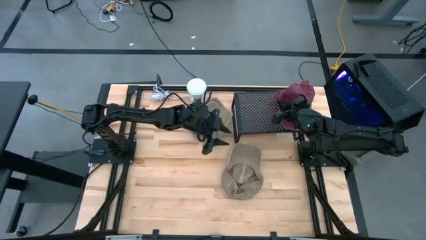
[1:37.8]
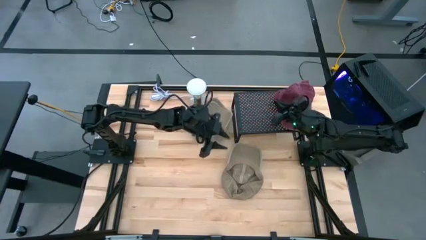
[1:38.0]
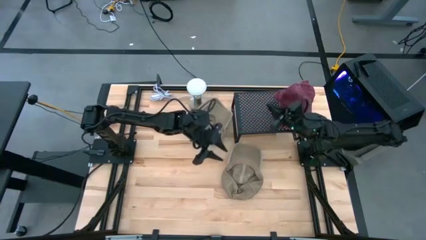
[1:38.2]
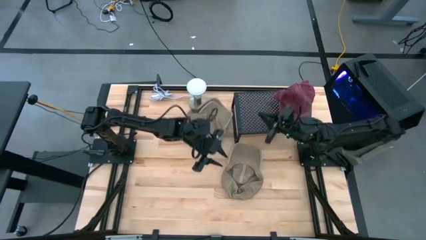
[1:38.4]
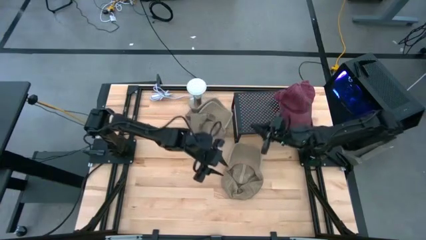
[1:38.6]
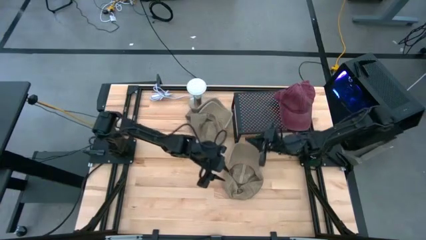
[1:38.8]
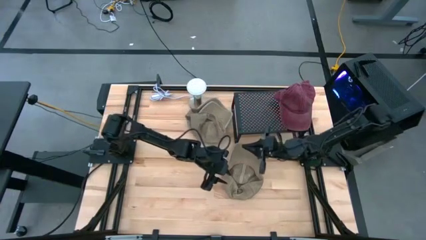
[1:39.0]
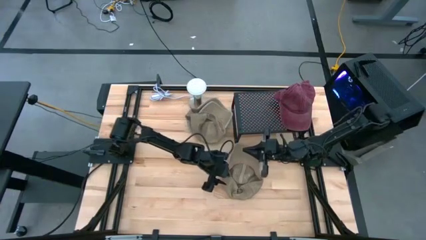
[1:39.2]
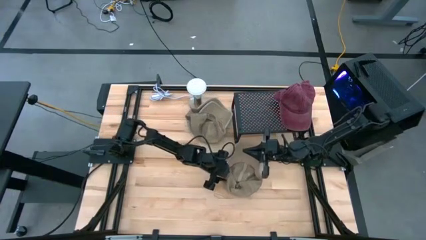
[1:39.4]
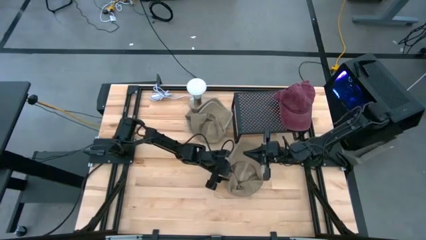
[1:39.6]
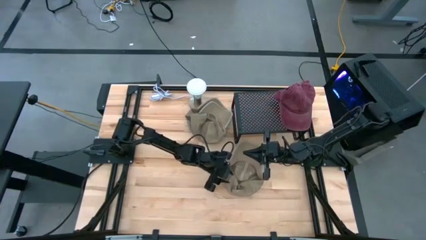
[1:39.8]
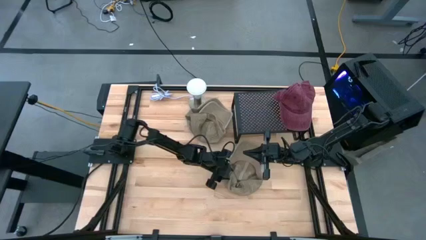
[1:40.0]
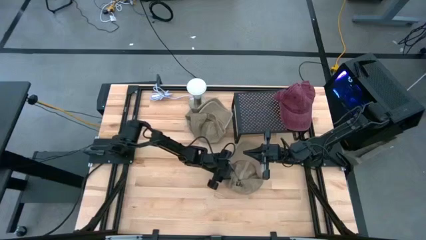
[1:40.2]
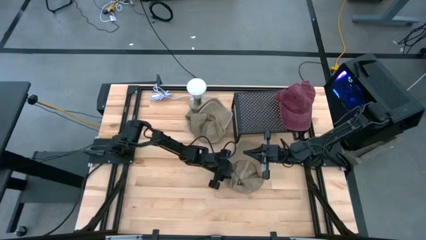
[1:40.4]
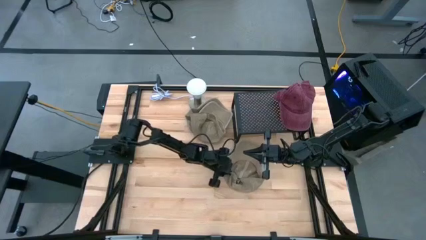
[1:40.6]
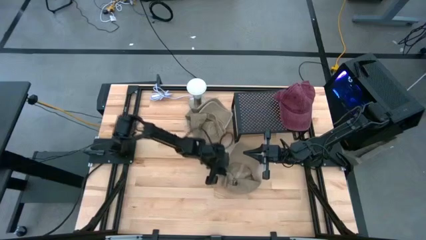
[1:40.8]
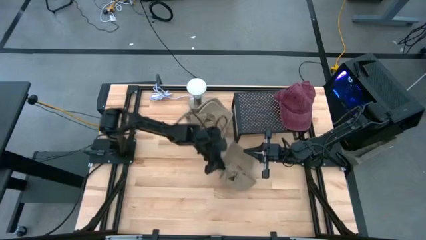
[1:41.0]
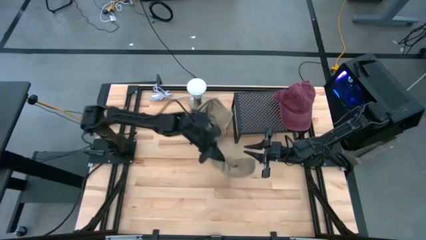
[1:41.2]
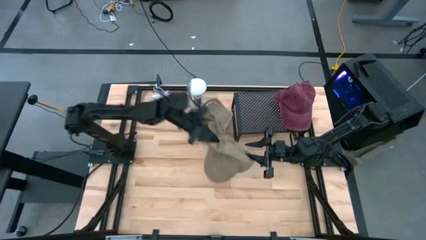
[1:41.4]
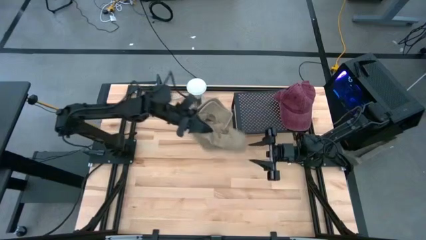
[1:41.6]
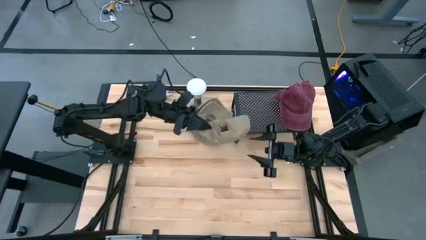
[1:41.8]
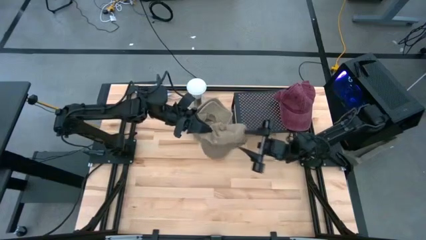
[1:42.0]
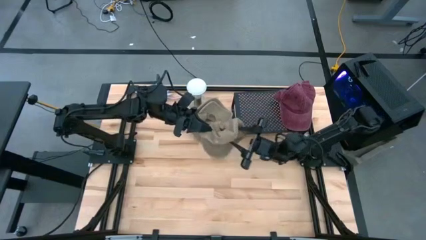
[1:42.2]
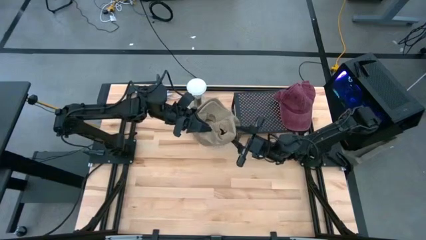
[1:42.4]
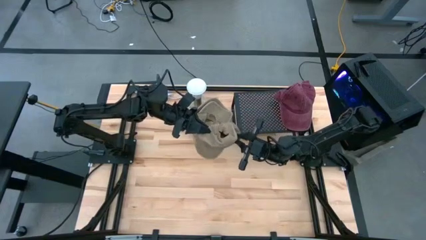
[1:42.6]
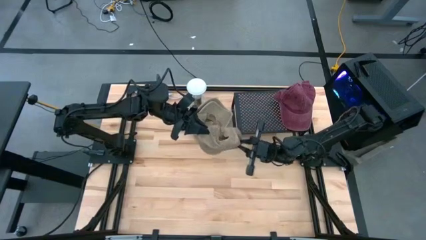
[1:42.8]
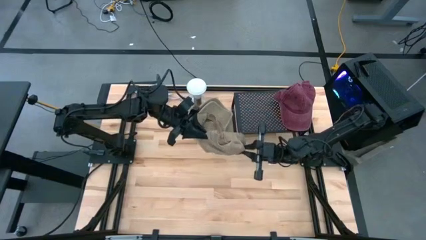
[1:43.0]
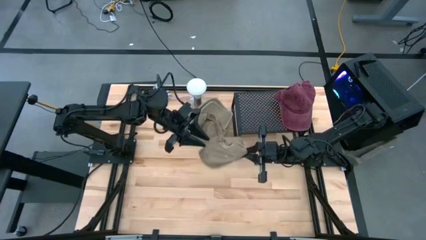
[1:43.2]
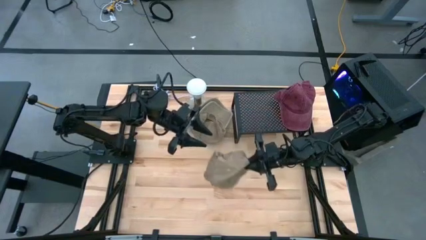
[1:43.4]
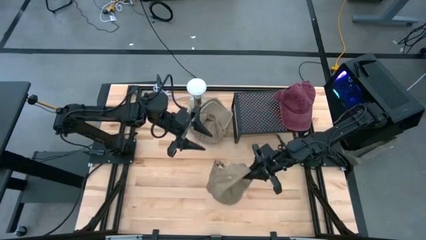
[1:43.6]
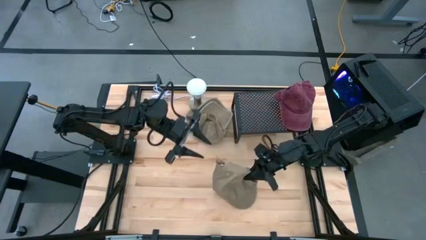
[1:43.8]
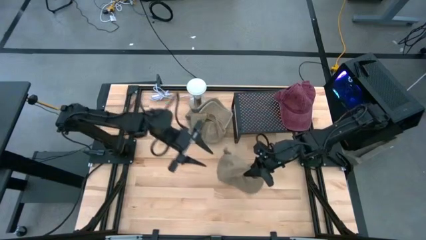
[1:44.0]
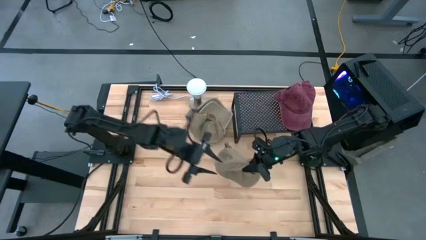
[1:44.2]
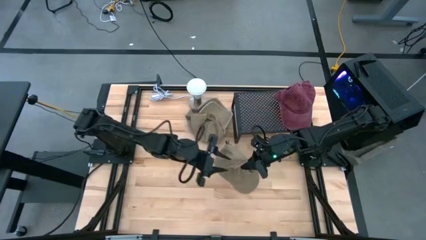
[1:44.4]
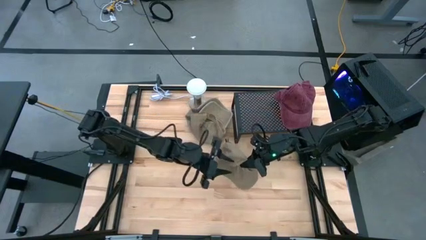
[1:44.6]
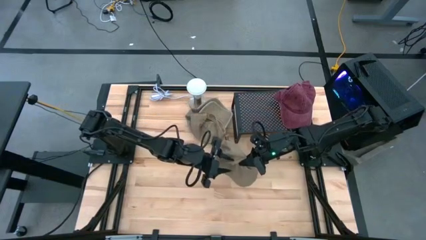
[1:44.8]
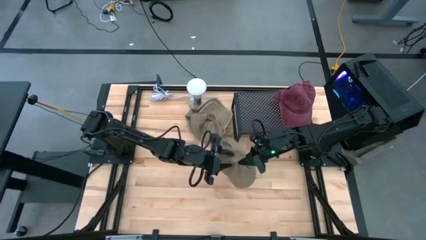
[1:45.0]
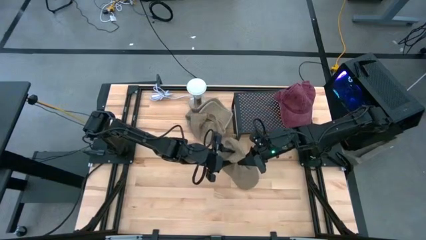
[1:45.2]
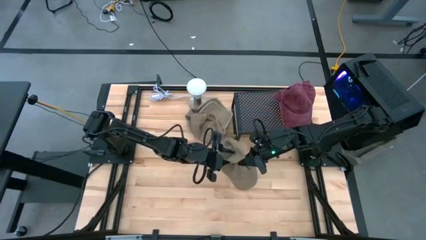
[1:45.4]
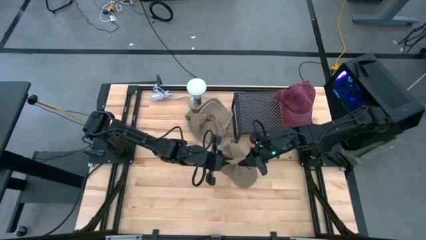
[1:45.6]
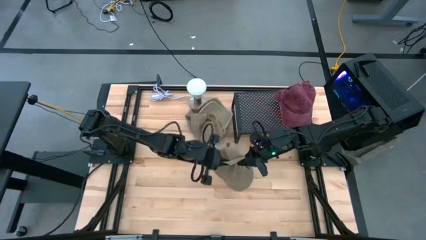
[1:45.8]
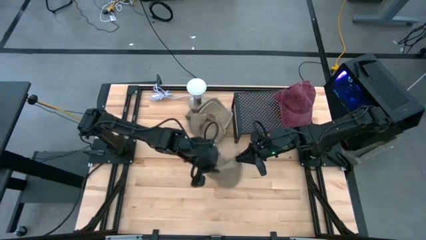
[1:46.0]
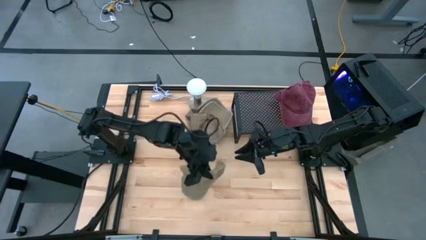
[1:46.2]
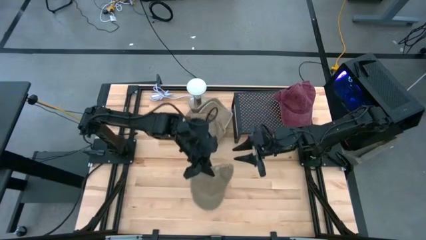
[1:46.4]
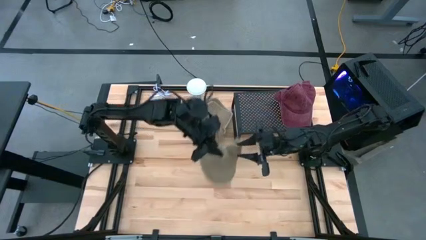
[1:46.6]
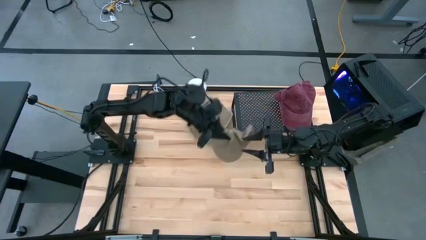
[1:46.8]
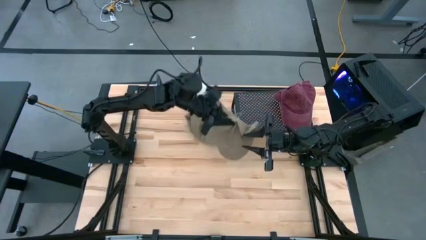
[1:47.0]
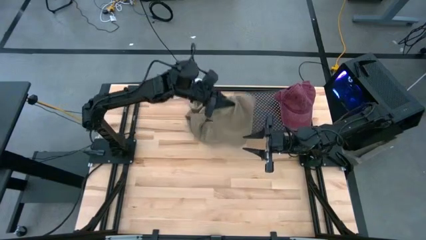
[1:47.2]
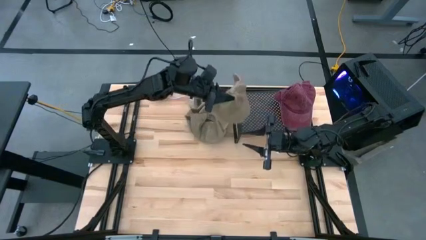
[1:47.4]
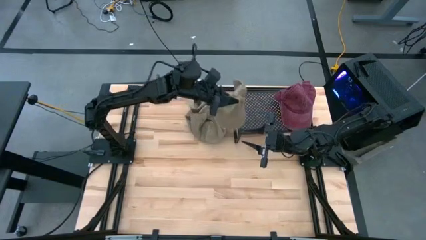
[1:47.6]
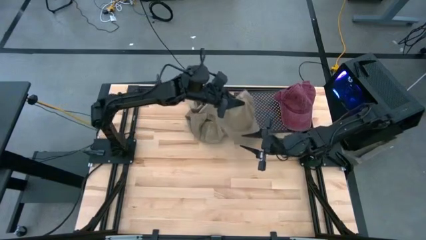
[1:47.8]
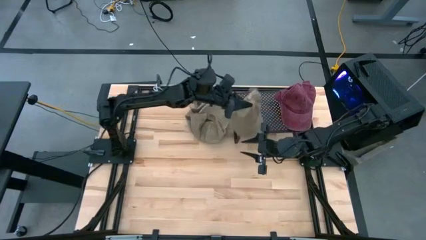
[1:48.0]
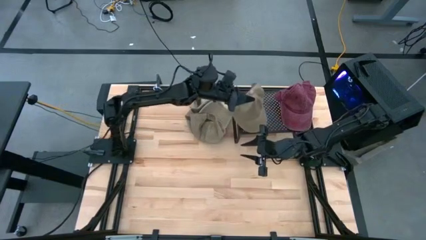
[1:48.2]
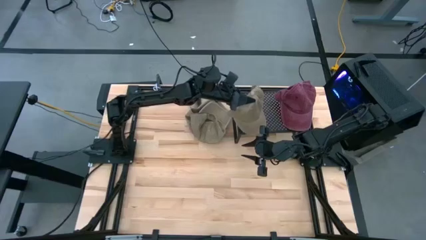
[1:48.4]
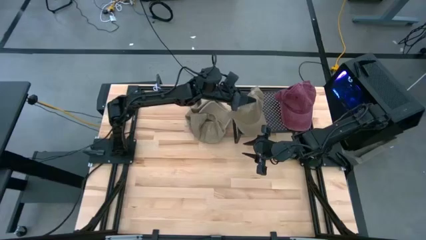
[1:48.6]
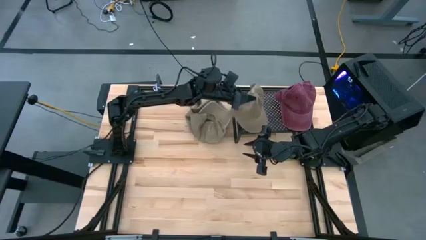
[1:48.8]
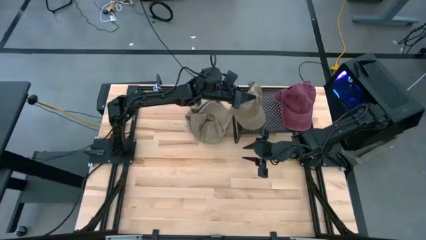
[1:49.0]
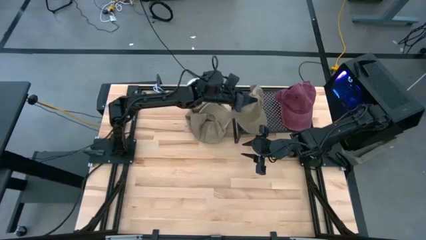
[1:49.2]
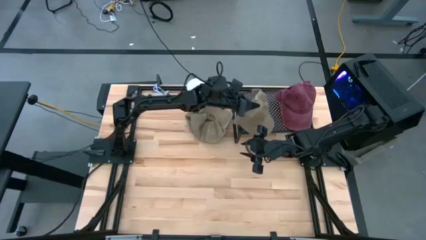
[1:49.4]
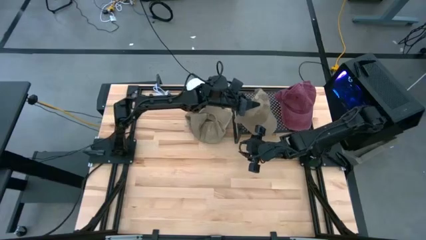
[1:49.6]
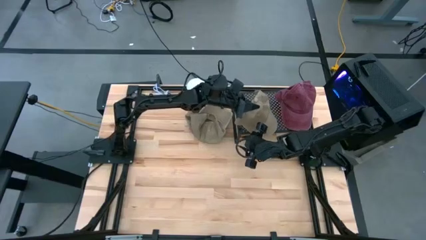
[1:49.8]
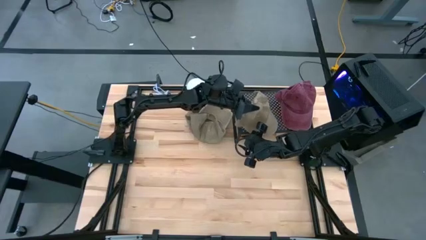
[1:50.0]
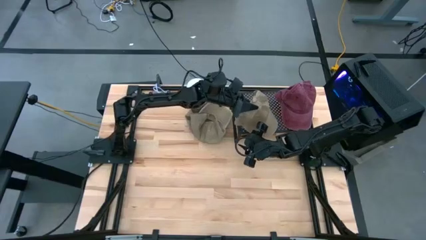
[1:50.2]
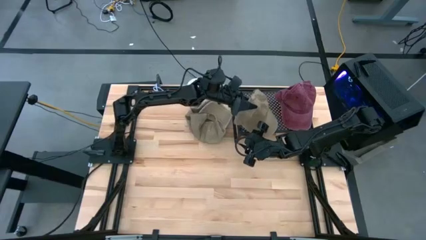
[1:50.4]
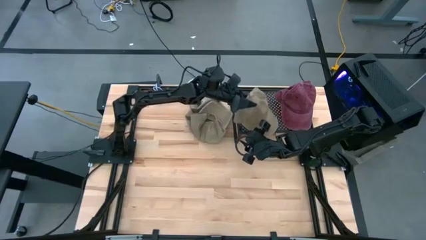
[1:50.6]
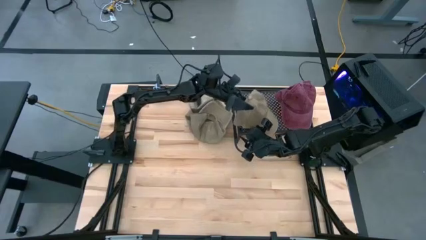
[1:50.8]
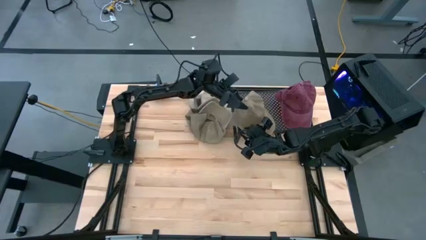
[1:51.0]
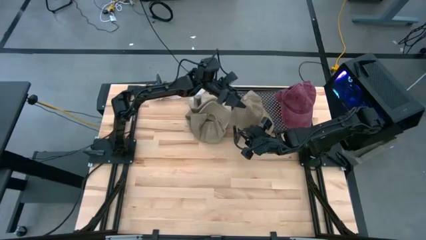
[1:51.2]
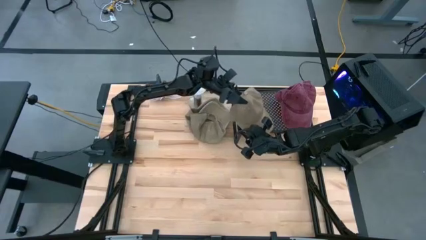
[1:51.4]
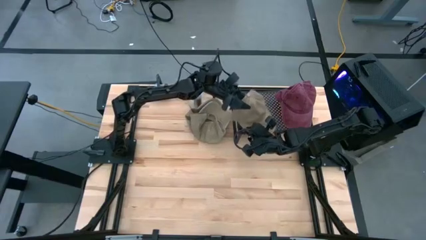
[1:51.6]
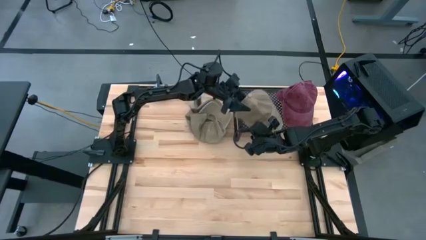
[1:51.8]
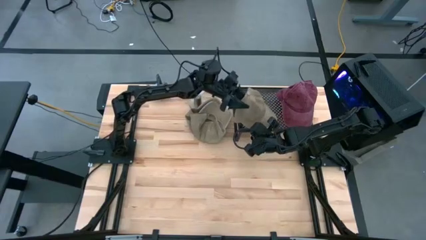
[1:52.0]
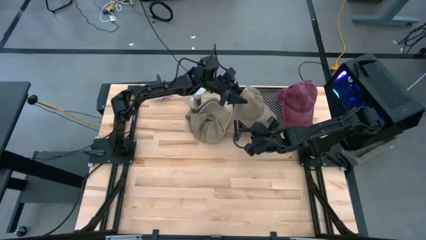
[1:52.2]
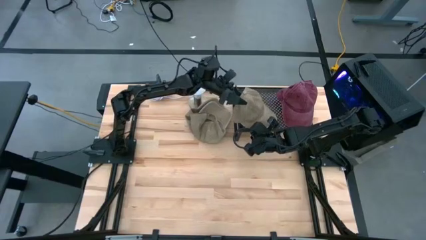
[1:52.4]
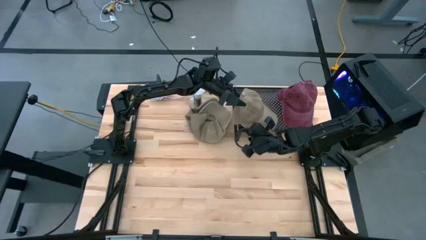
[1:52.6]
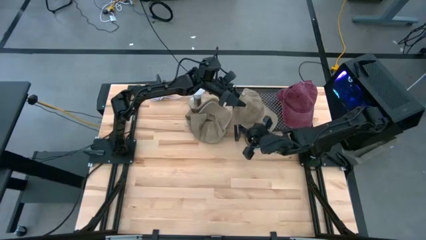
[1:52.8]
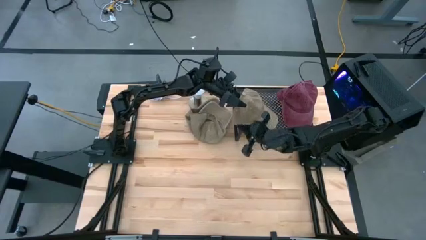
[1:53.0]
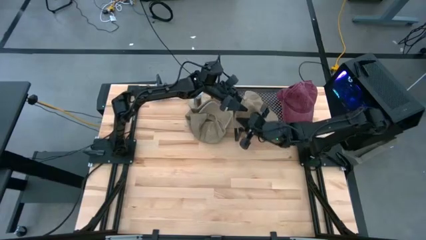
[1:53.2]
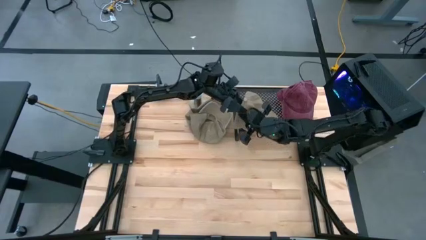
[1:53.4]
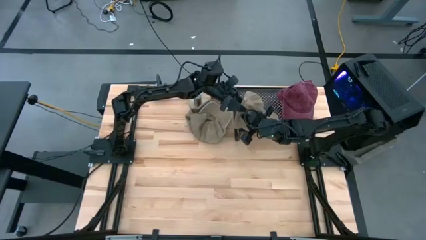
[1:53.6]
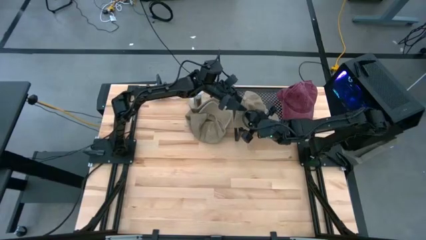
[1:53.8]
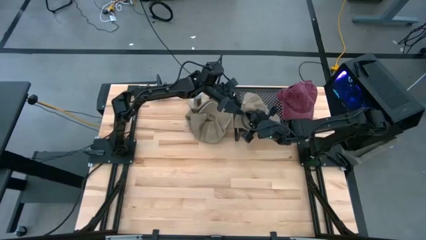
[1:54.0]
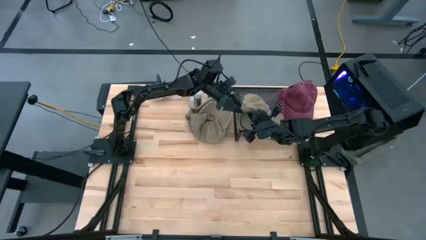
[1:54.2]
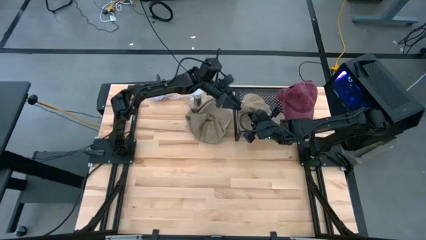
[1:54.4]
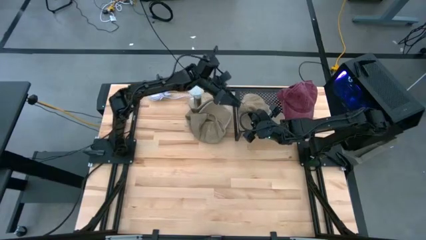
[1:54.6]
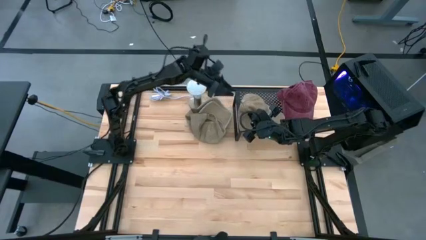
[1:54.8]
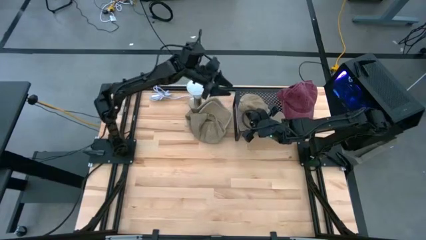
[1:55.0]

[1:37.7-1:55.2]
Task: Pick & Place hat
Put the brown hat on the black shelf
